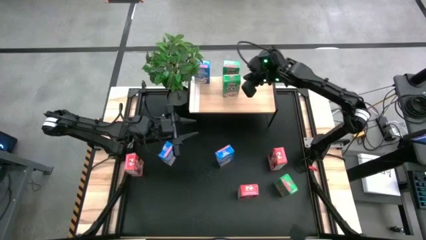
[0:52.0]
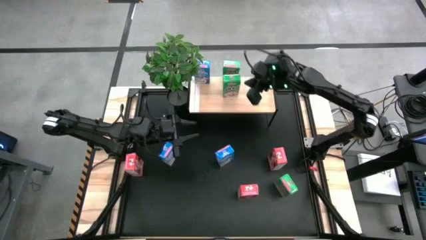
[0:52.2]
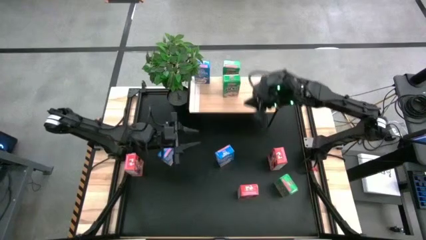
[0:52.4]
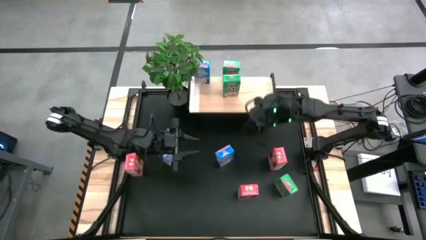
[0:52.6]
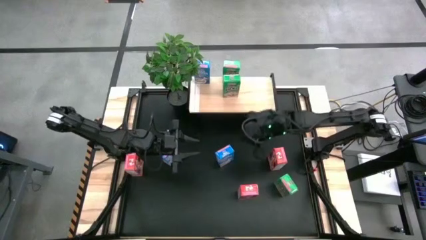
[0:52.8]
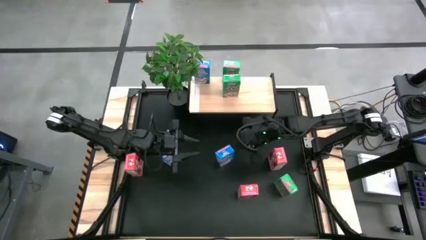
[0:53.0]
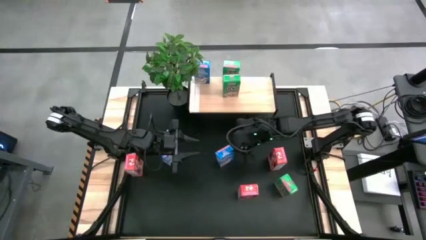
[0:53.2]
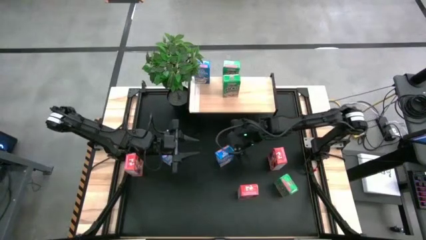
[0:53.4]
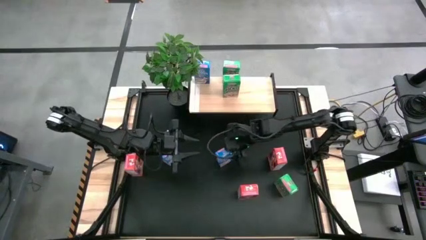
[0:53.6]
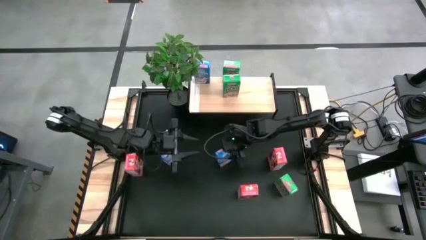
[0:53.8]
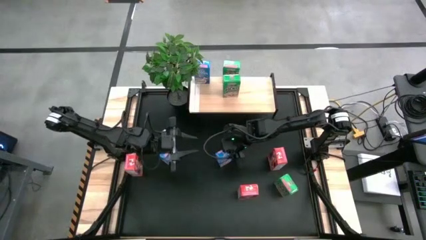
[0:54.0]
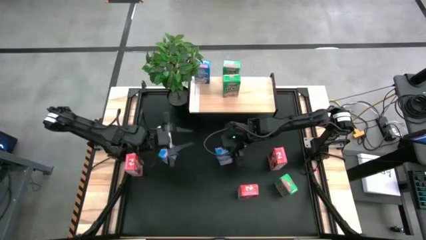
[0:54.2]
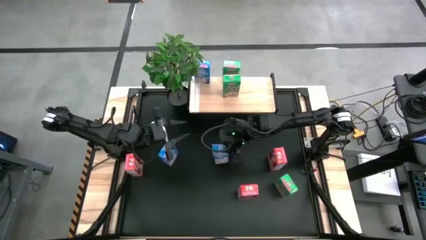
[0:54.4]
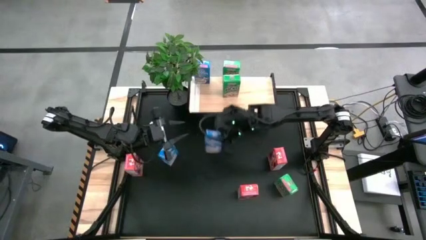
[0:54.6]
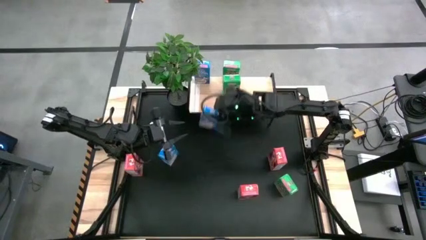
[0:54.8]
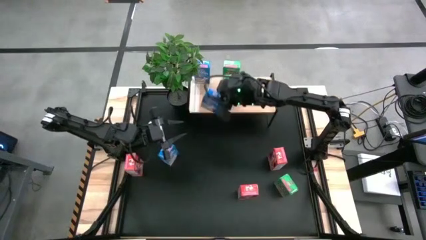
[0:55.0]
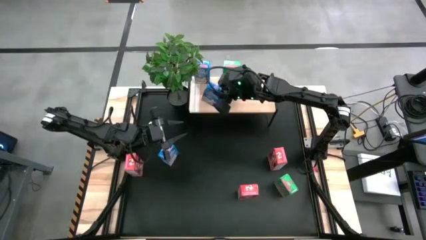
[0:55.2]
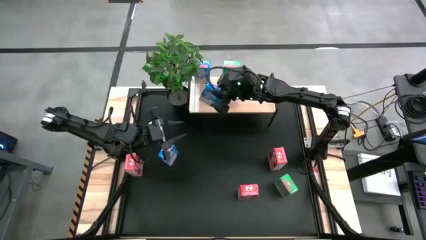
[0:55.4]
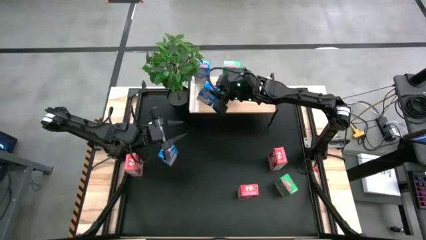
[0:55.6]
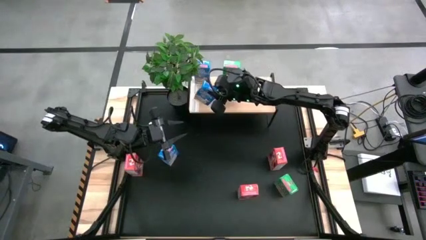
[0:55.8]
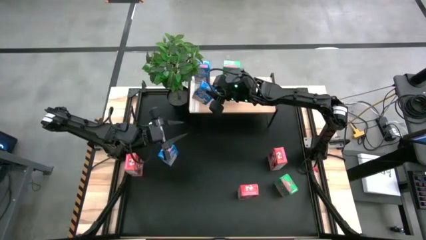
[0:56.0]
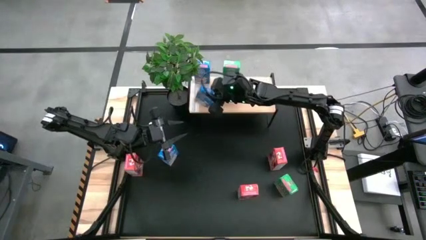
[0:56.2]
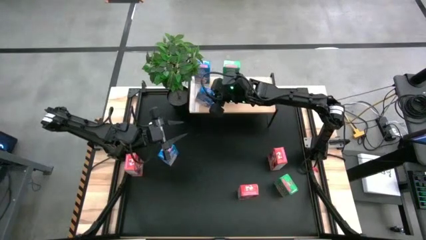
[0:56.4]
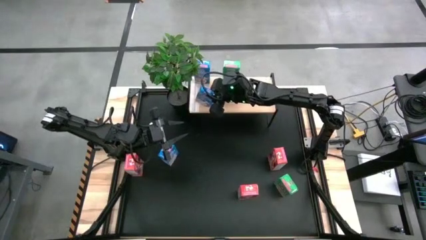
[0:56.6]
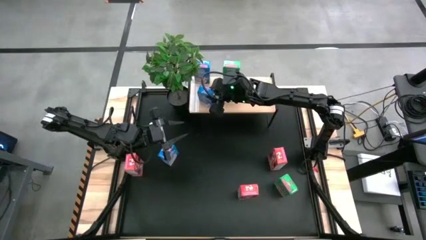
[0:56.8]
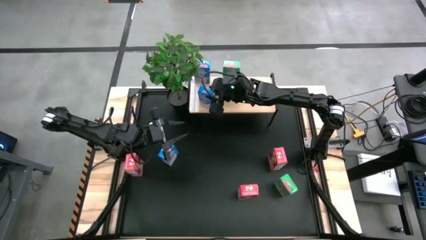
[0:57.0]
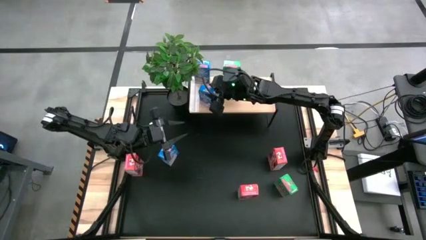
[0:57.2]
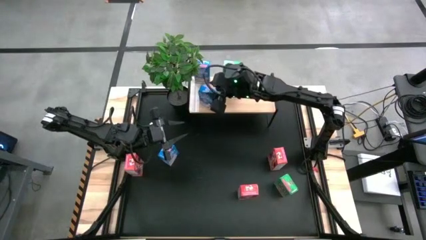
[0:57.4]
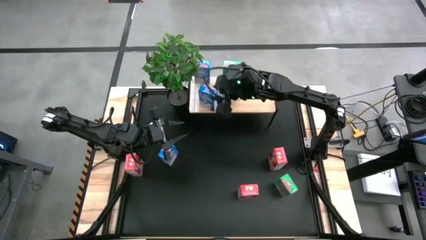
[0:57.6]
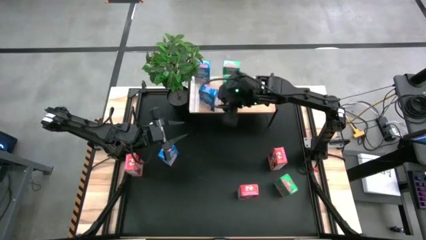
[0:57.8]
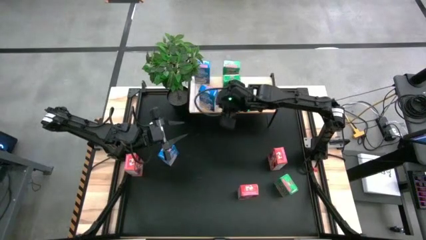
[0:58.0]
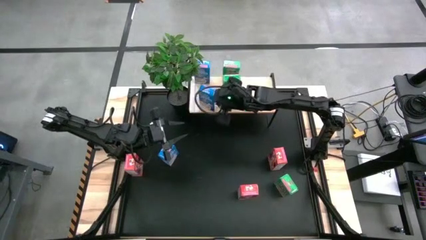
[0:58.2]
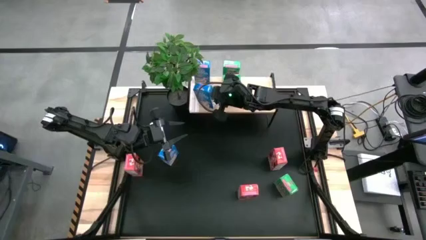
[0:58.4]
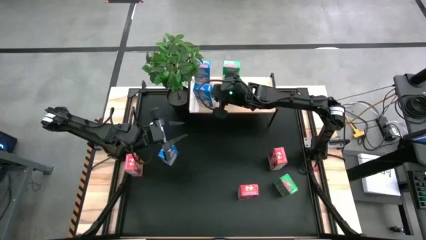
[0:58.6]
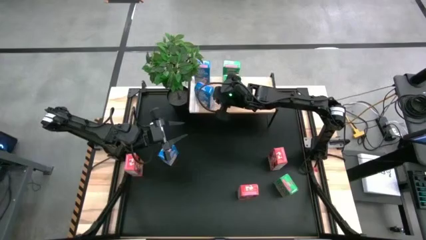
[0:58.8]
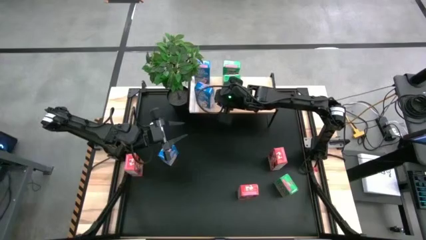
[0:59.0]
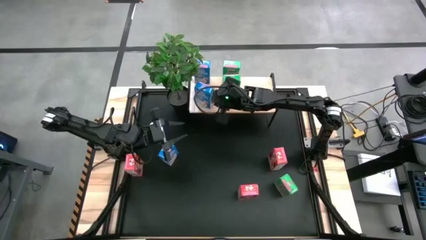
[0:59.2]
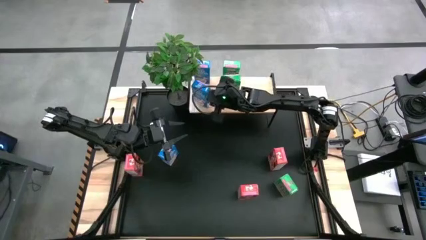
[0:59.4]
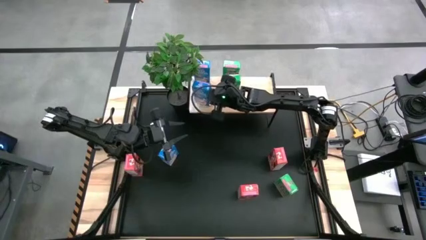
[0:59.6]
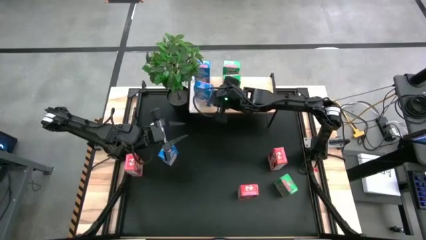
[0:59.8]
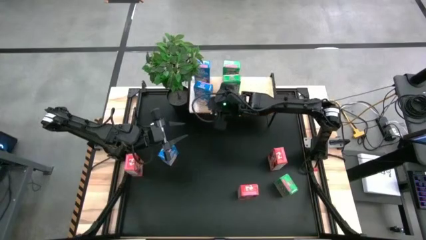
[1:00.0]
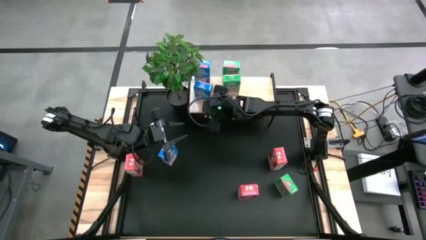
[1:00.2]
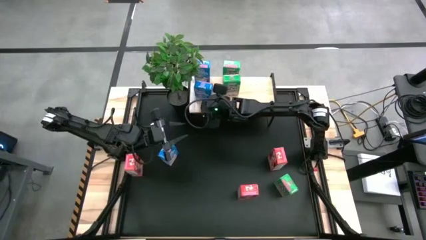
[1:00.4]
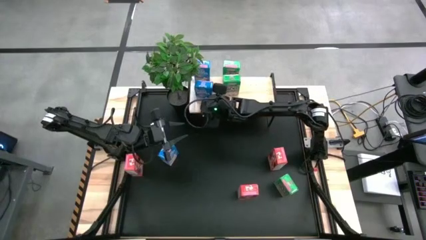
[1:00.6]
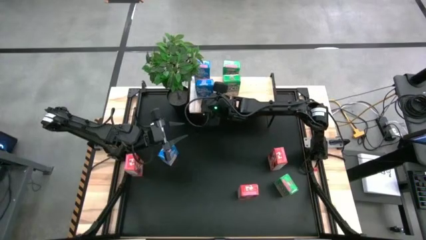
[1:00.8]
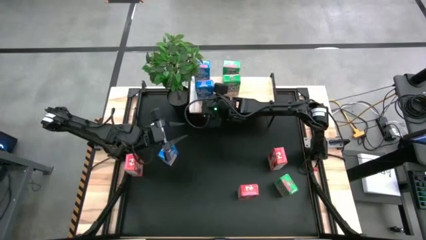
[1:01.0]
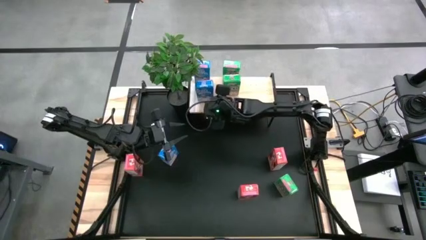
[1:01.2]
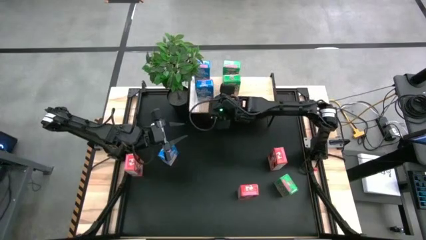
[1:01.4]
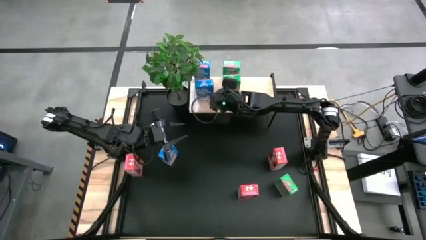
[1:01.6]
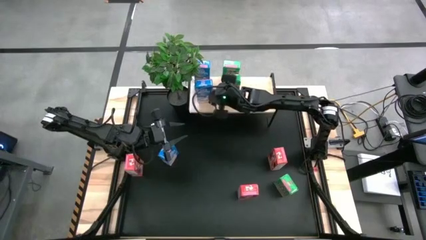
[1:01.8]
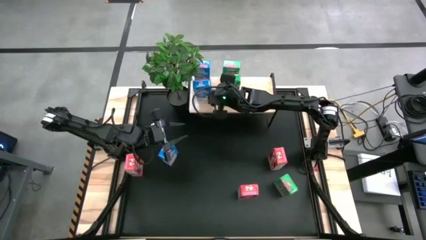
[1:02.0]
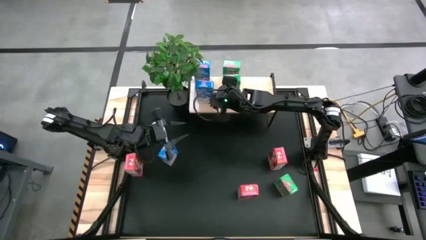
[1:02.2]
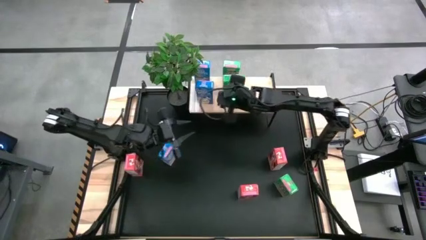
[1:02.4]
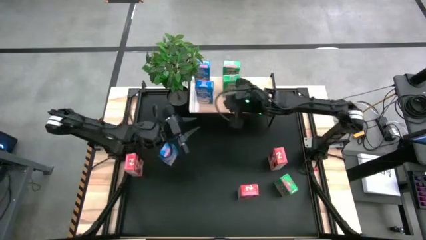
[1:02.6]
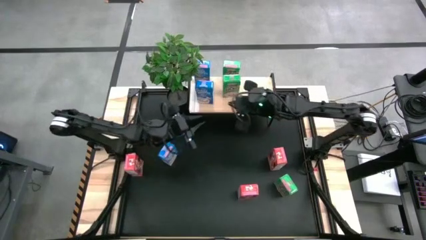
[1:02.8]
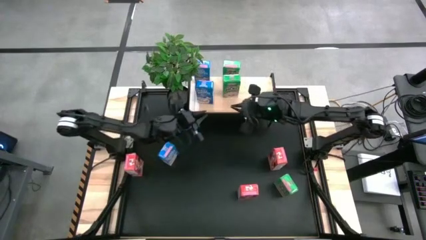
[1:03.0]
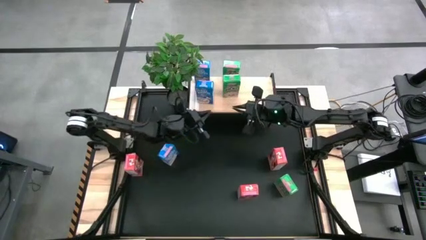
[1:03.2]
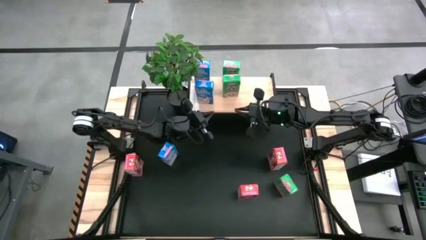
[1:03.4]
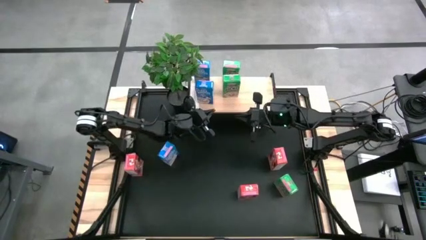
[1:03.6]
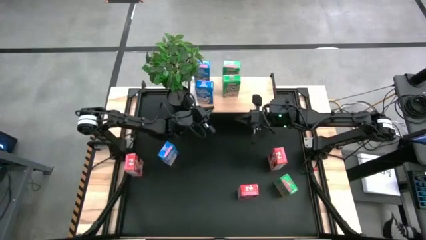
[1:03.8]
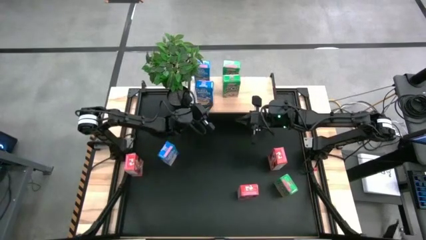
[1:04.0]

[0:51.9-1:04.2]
Task: Stack cereal on shelf
Put the right blue cereal box on the shelf, aligned with the other blue cereal box

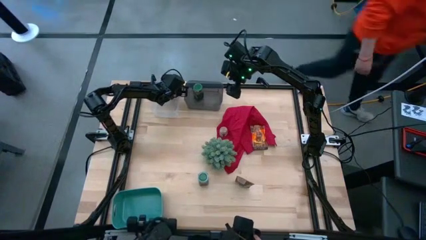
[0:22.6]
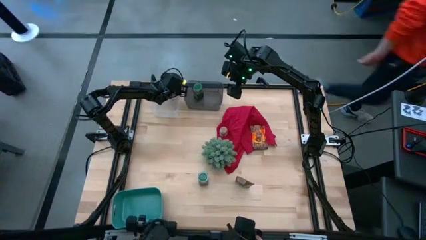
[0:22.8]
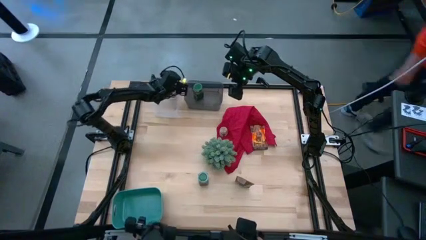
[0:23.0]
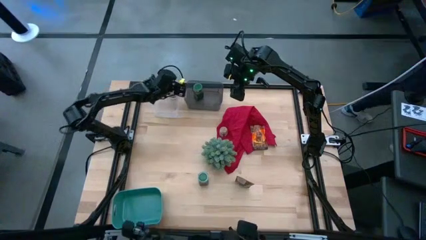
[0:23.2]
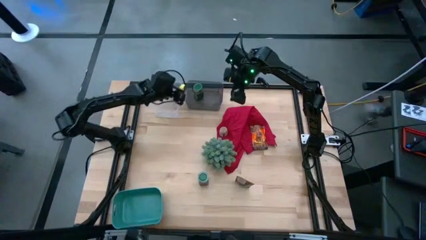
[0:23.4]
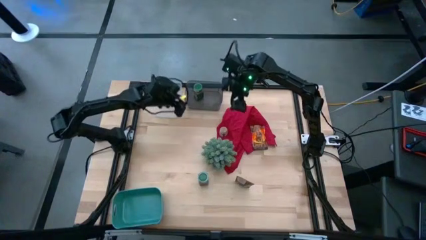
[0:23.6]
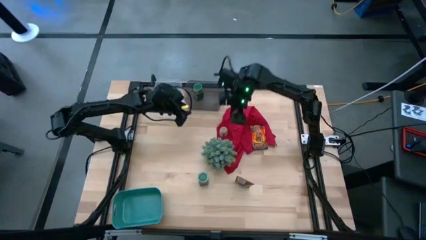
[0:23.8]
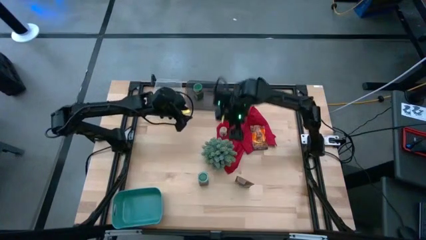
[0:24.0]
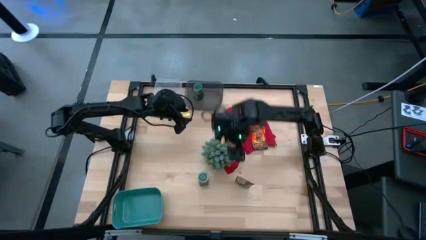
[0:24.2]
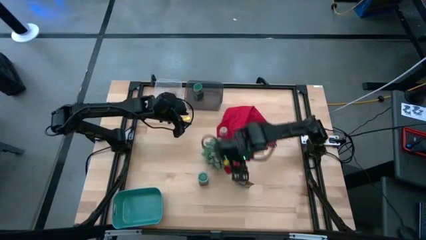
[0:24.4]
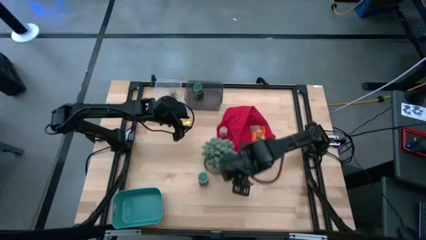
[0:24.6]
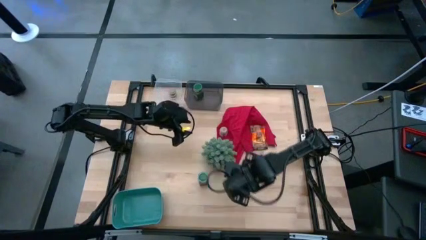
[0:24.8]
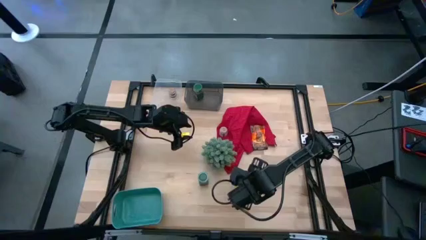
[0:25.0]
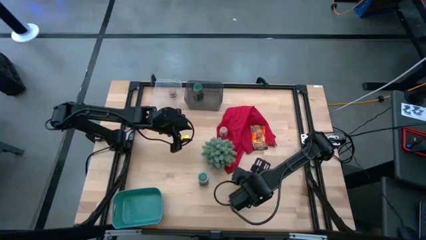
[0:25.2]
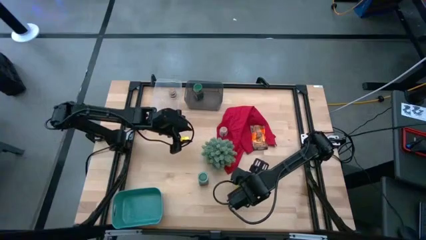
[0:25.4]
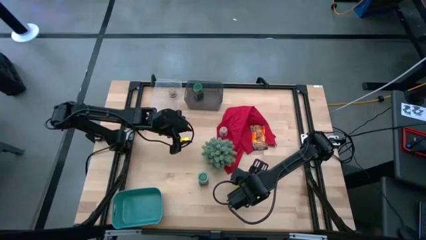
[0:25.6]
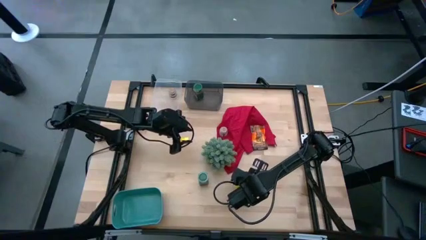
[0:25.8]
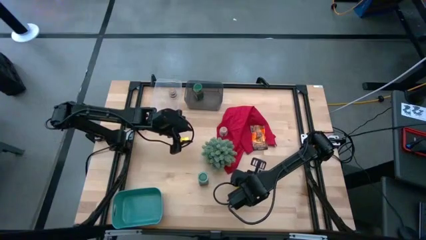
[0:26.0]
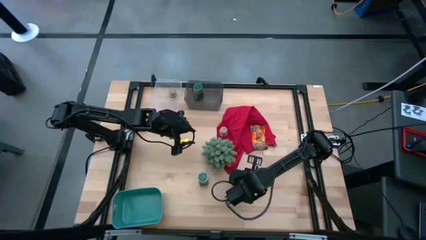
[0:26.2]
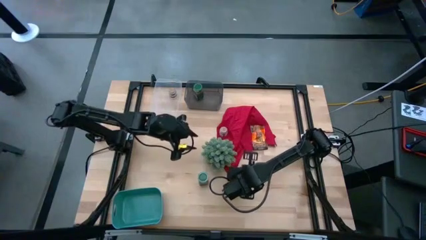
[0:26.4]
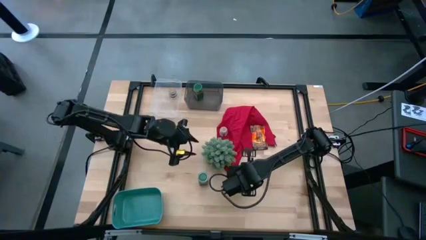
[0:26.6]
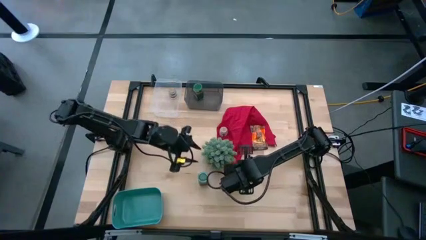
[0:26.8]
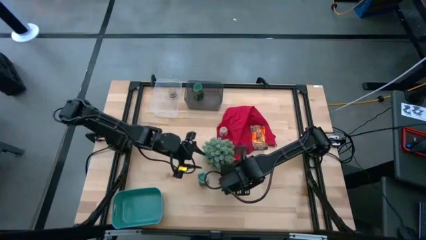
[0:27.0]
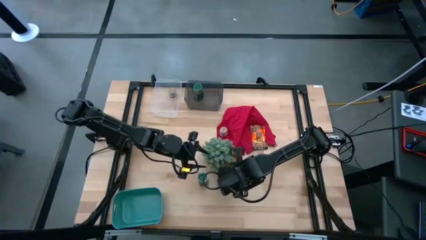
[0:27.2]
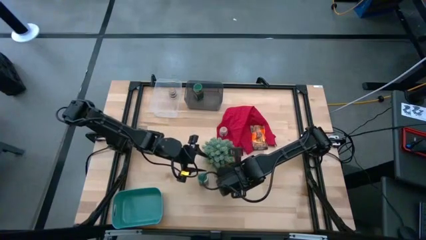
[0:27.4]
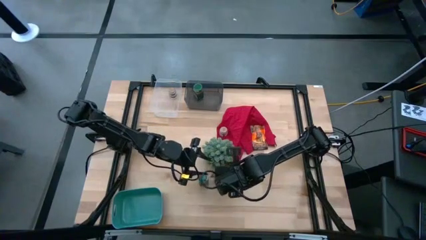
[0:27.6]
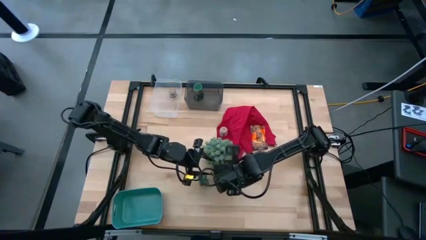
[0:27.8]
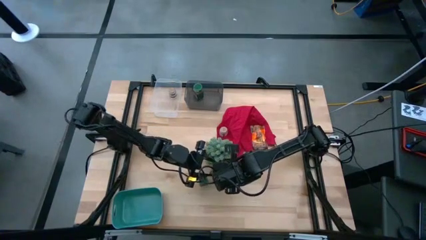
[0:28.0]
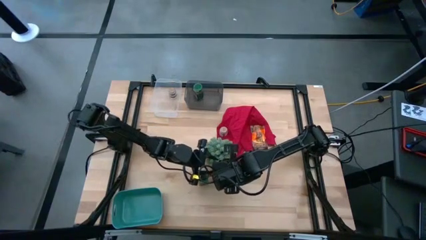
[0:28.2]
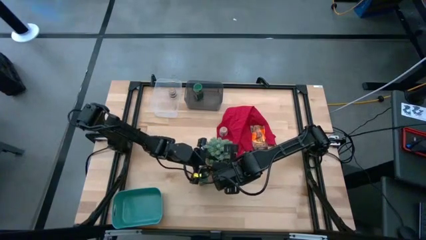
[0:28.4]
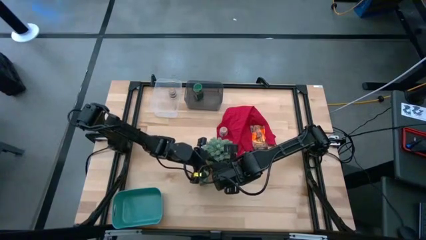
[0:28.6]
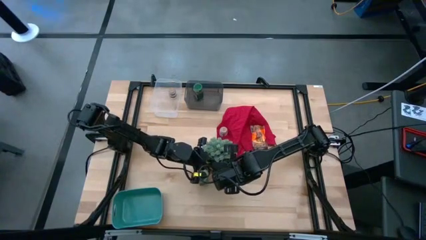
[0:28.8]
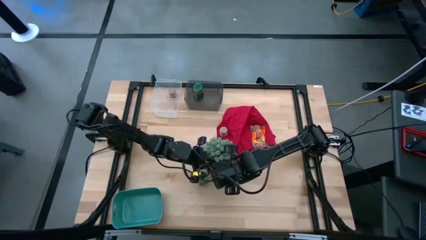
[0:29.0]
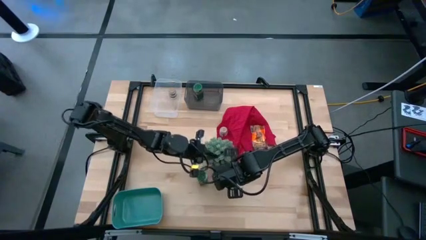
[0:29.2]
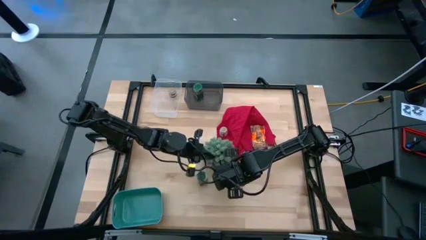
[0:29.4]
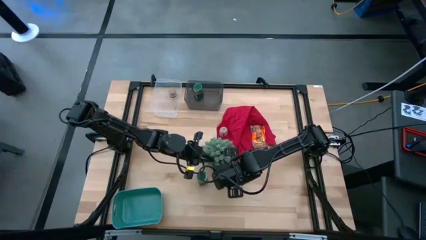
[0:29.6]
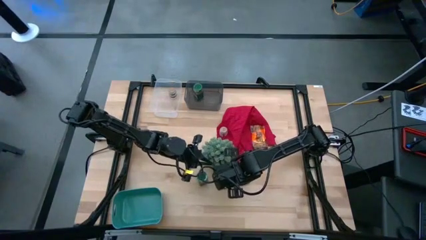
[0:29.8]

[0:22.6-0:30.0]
Task: Sort spices by type
Put the bottom orange spice pack into the green bin
